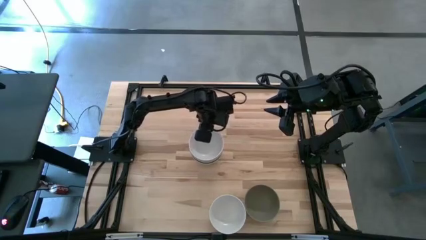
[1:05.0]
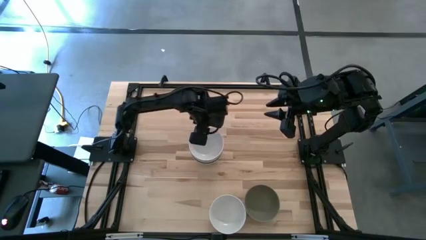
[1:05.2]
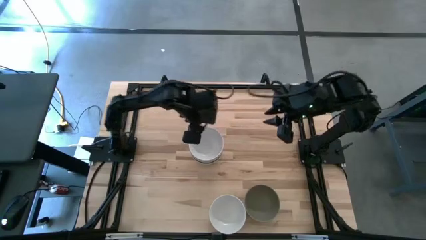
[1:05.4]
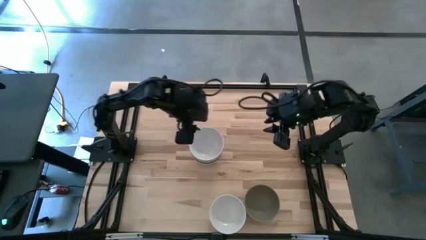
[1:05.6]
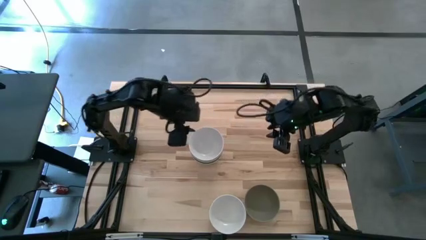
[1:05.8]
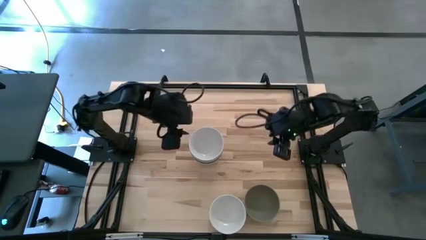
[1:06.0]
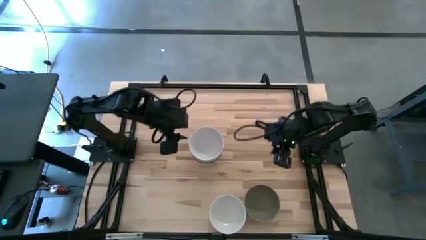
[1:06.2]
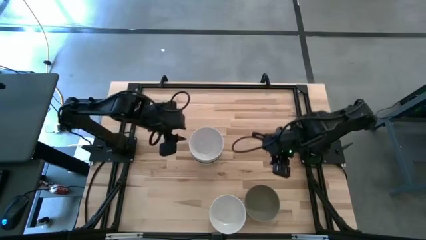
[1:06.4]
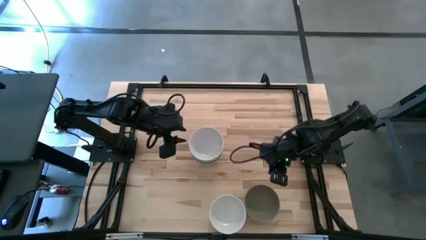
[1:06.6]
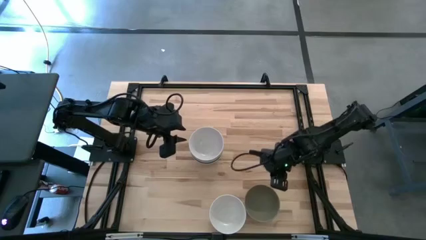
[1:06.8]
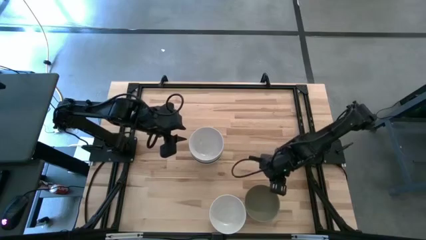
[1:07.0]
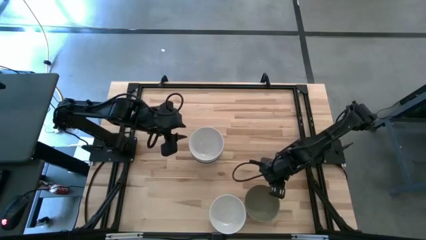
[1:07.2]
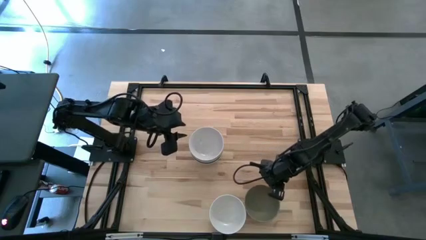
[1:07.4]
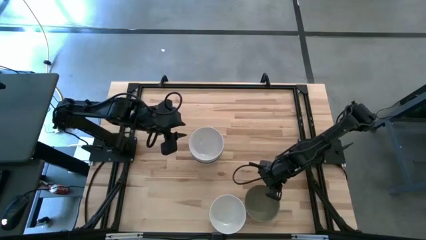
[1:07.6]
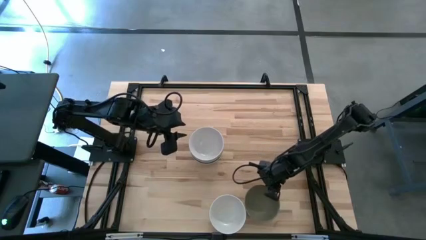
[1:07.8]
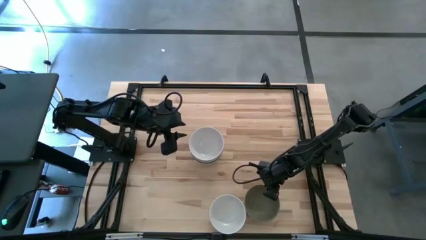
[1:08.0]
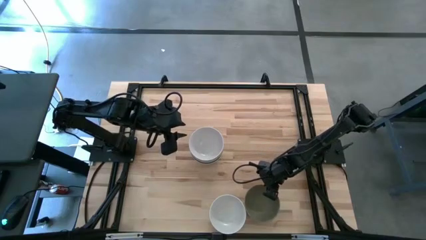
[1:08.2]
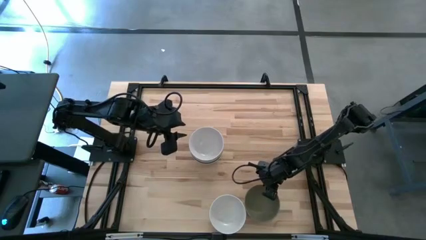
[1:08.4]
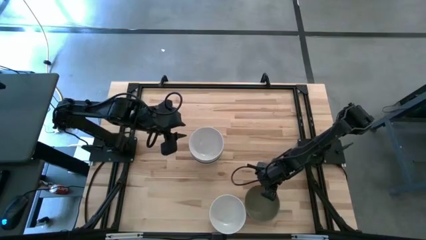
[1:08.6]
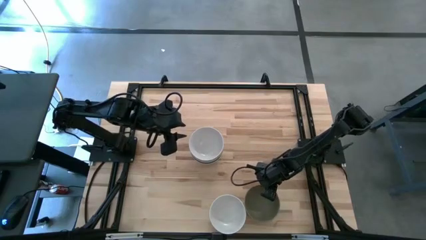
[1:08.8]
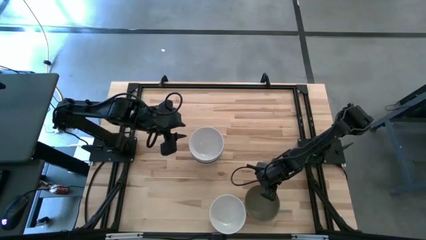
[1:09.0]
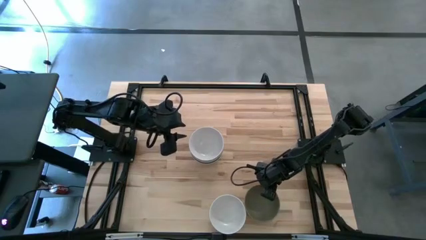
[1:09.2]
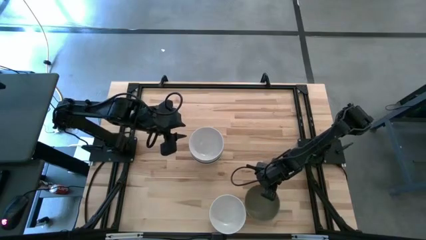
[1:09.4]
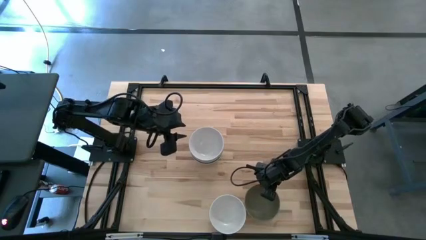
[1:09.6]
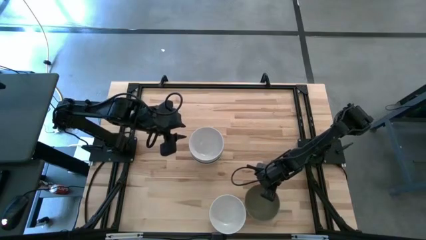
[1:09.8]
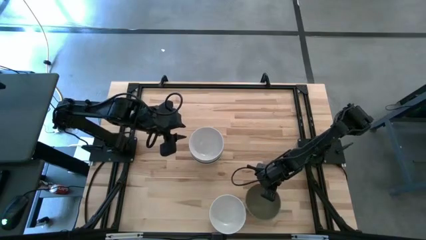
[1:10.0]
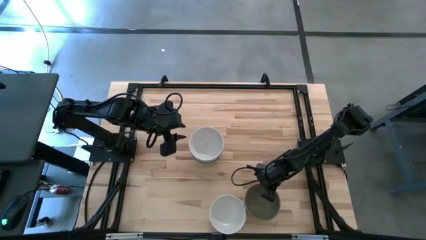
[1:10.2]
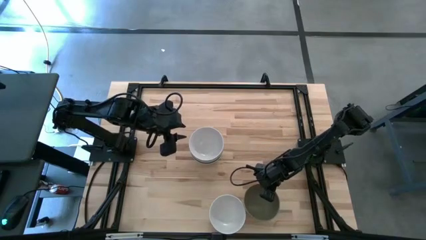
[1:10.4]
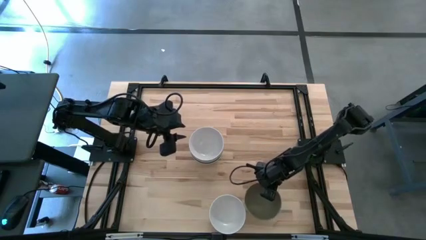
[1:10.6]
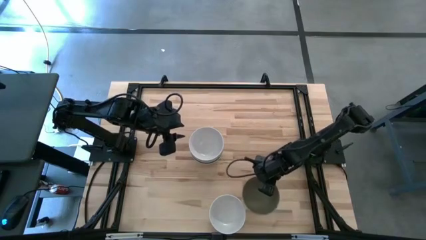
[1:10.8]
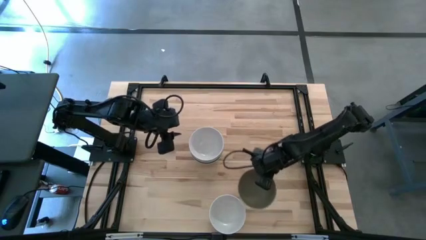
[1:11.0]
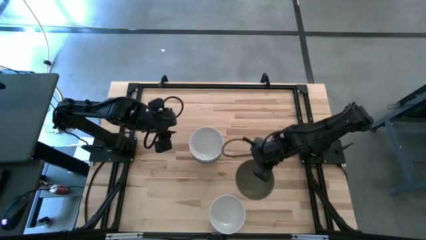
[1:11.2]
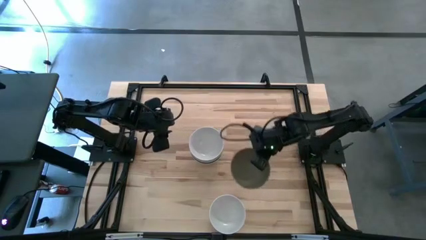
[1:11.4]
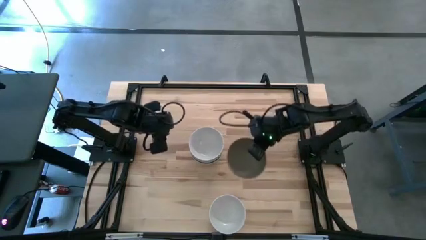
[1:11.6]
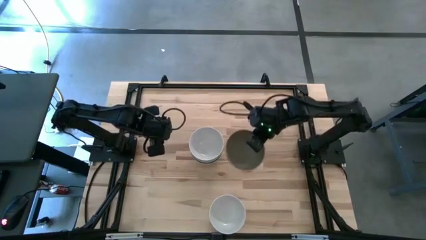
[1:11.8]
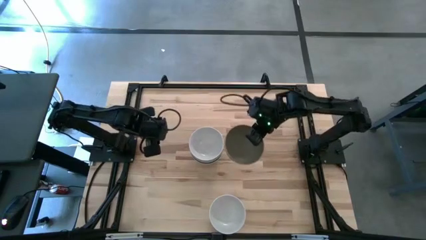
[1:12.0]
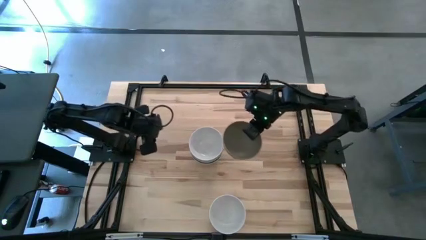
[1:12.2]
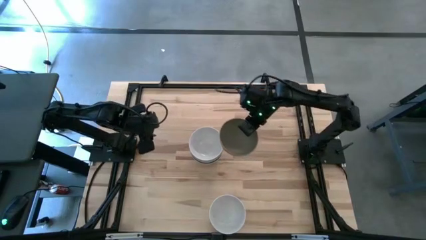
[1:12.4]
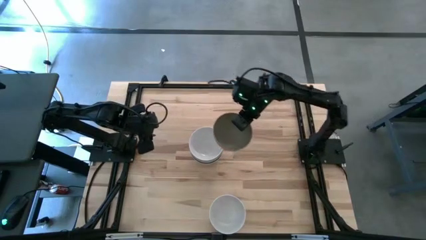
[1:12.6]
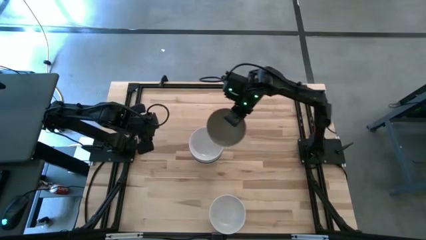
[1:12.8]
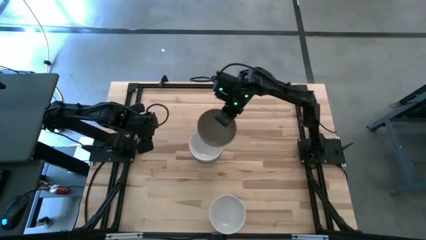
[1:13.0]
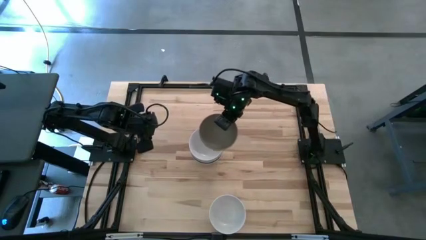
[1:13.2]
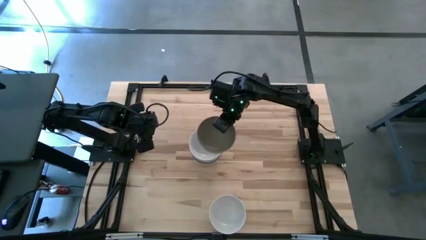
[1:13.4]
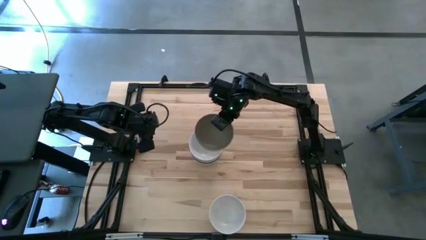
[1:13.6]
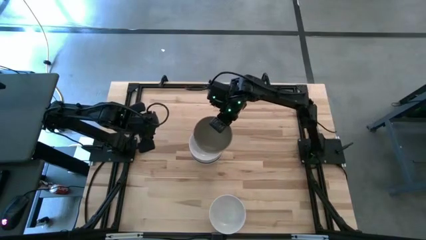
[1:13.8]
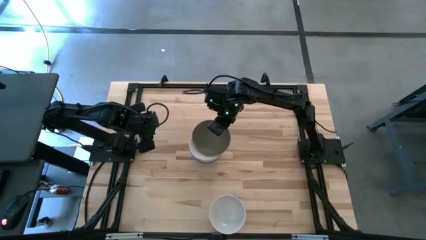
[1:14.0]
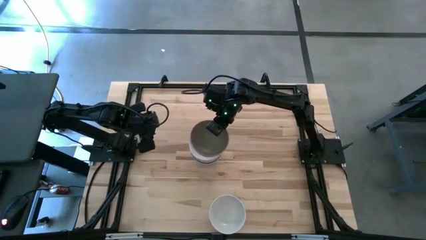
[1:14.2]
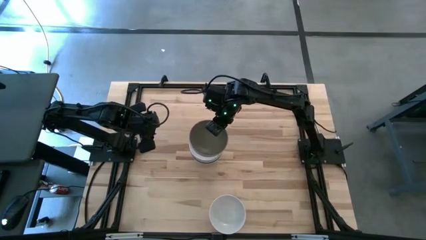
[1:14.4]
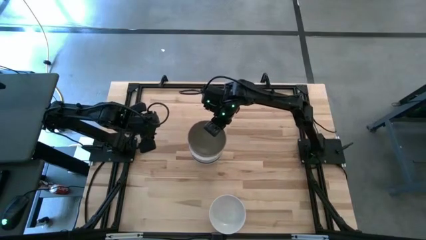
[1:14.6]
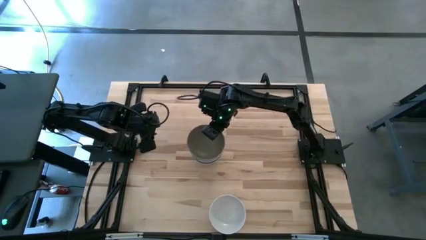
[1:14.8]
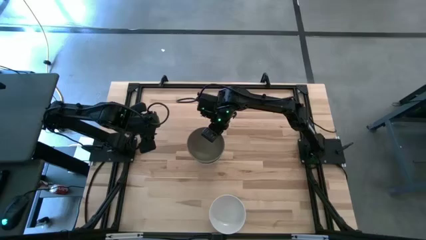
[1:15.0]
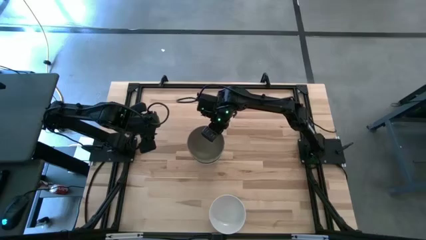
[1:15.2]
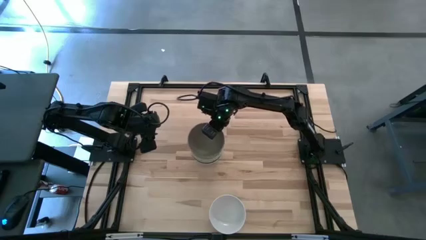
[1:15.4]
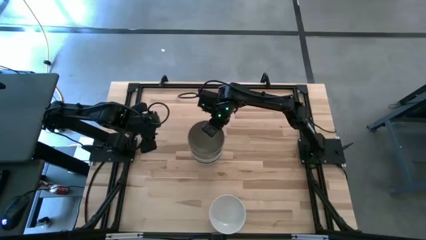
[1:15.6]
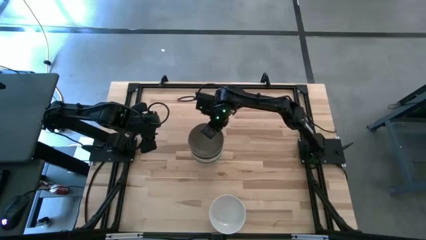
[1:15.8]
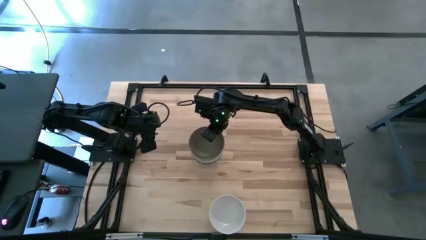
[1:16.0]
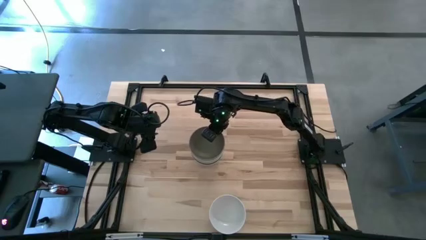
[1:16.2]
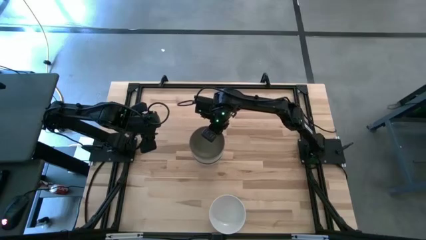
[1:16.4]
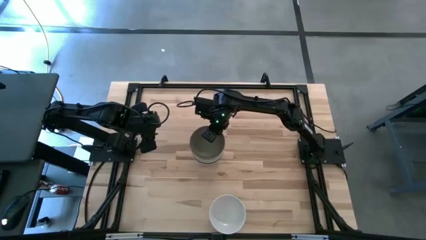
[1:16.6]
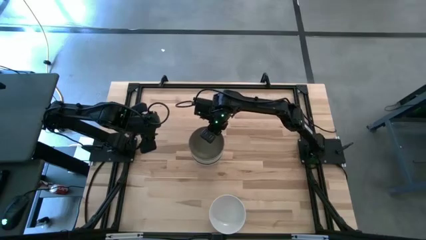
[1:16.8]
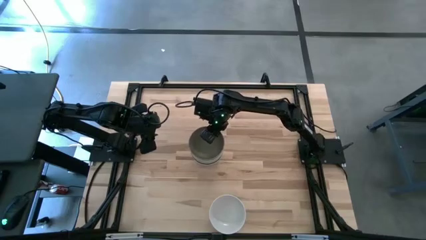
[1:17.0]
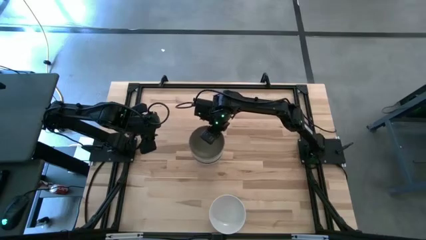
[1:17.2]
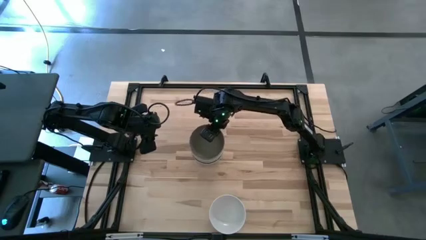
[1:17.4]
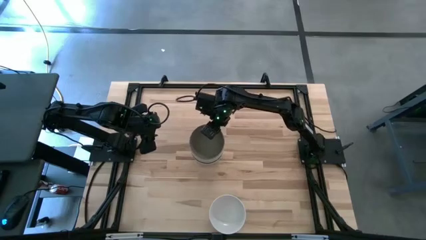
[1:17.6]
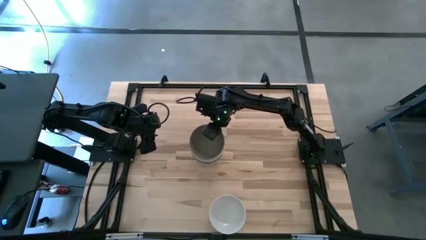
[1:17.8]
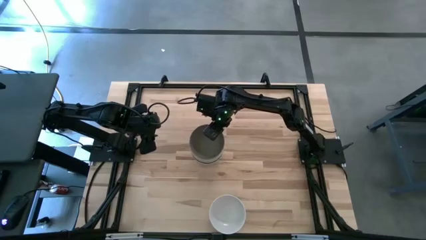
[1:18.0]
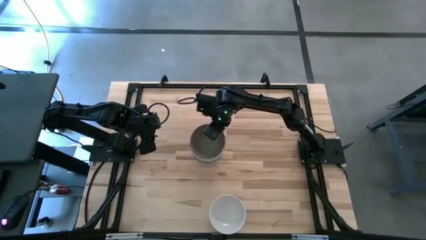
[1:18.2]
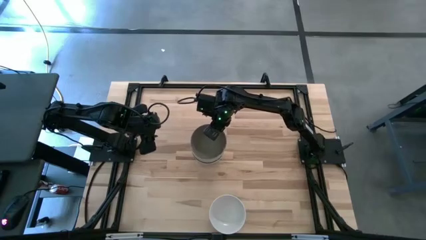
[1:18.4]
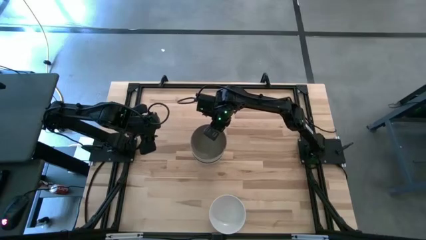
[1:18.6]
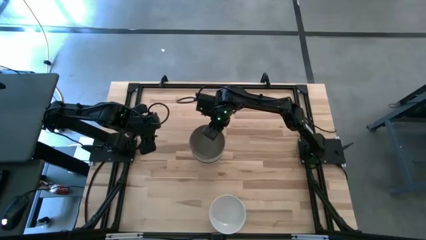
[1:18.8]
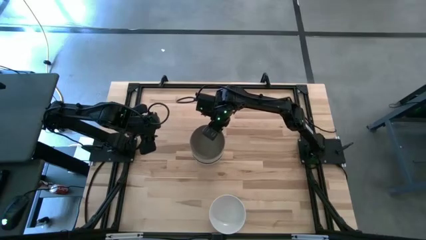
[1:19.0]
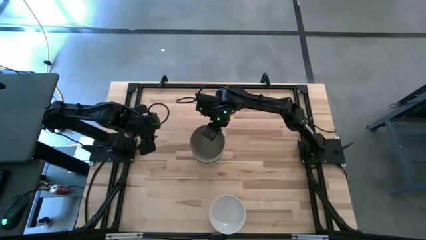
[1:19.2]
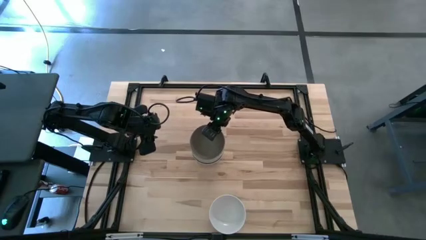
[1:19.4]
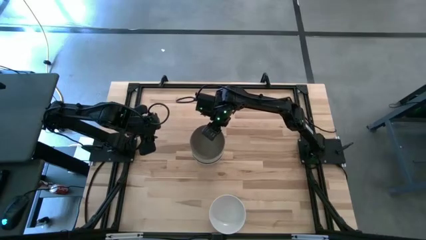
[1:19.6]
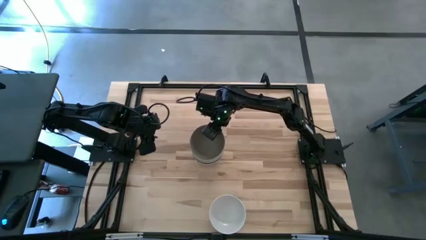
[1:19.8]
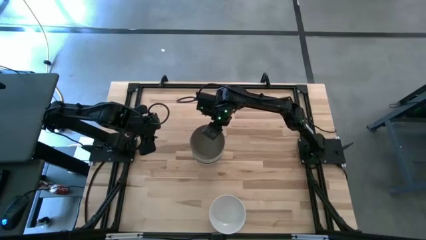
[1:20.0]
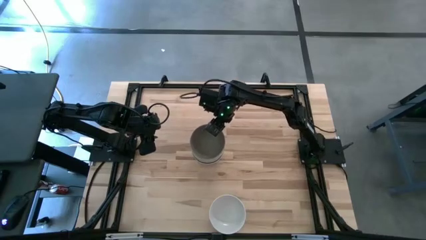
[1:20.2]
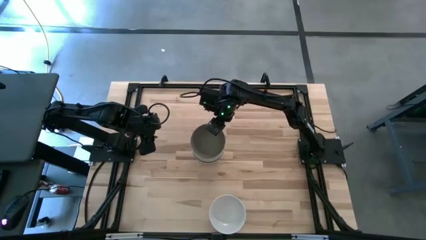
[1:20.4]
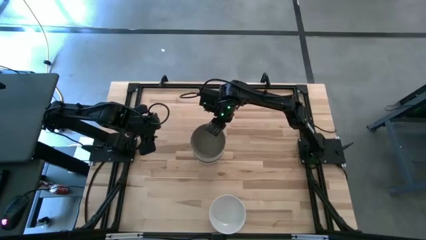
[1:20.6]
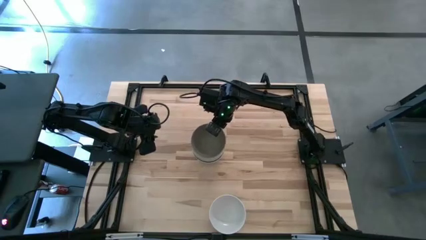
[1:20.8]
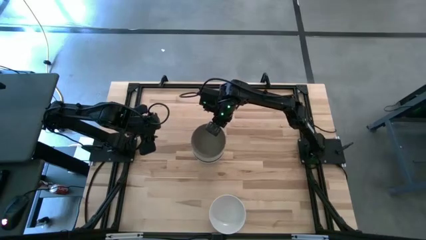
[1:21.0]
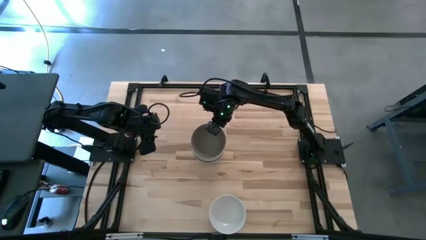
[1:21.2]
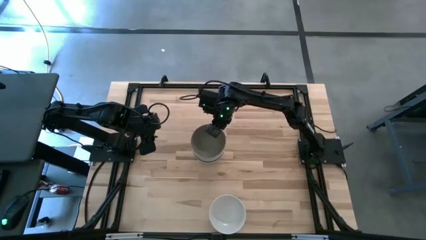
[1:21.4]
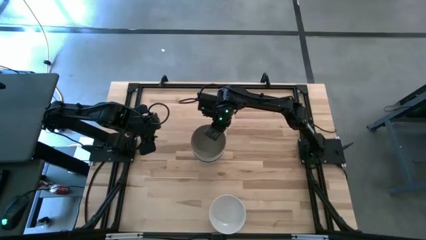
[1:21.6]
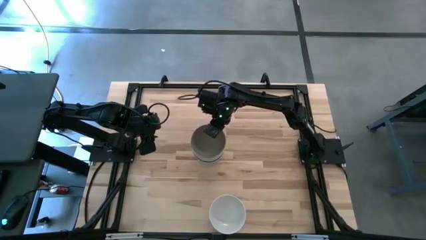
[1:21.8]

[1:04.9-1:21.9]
Task: Nest bowls inside each other
Stack the gray bowl on the white bowl
